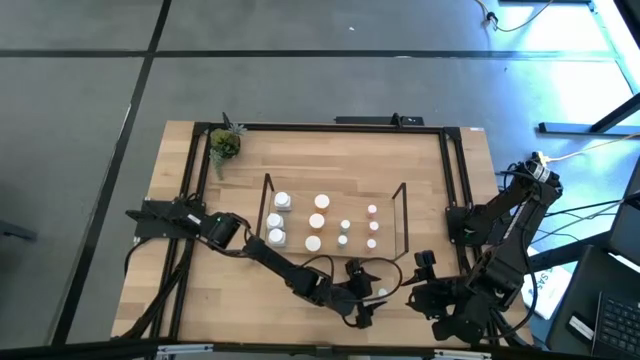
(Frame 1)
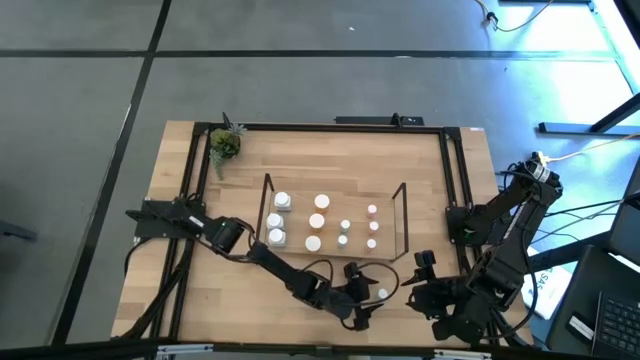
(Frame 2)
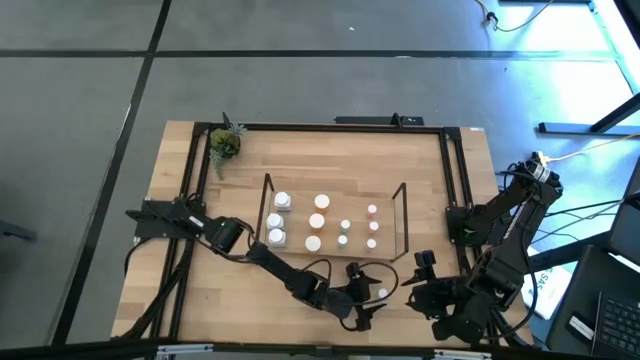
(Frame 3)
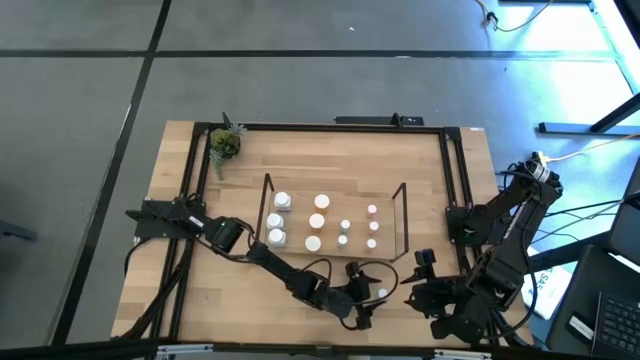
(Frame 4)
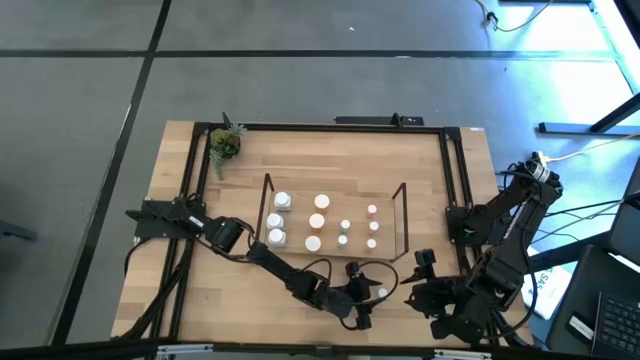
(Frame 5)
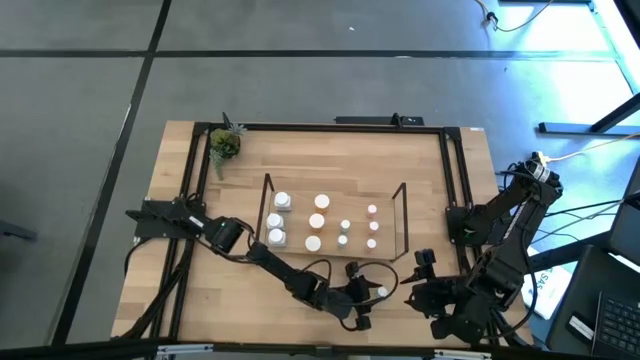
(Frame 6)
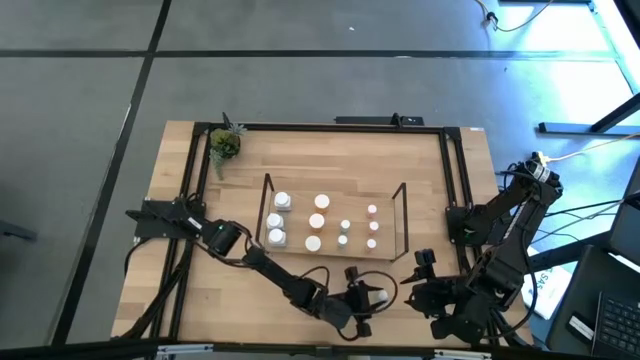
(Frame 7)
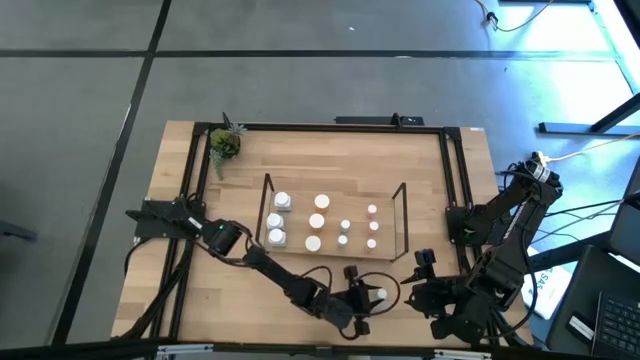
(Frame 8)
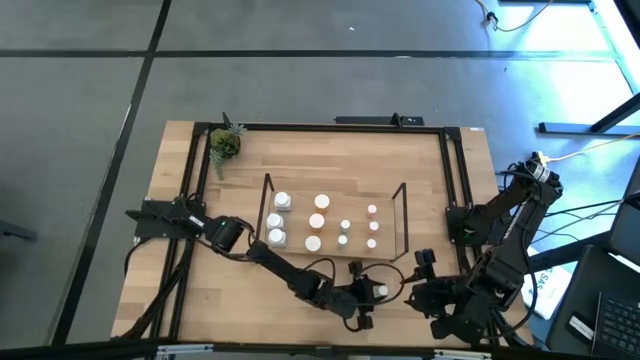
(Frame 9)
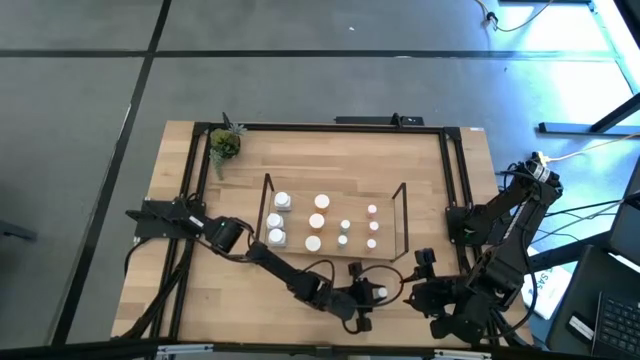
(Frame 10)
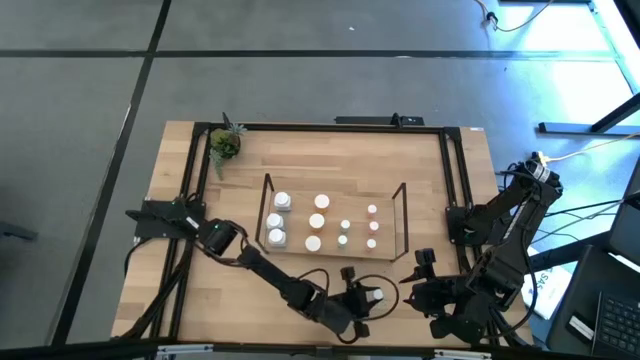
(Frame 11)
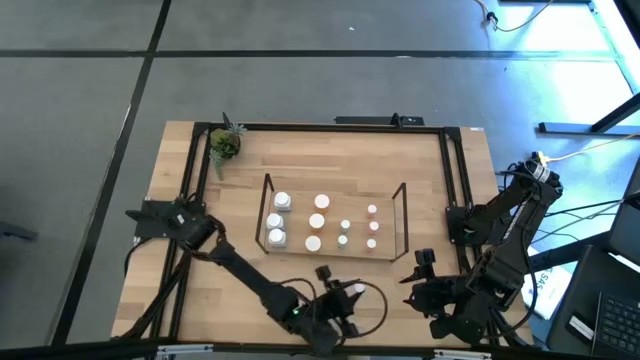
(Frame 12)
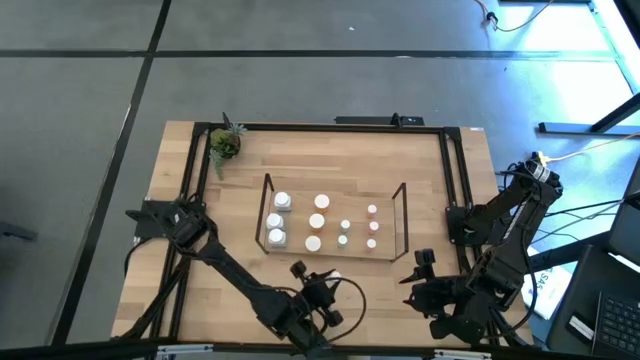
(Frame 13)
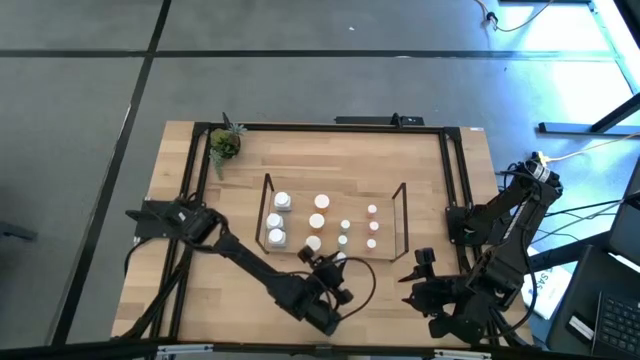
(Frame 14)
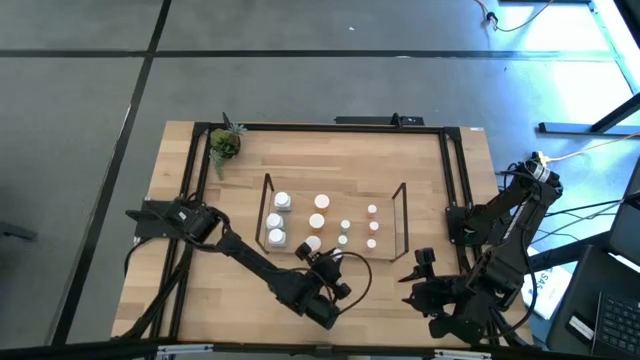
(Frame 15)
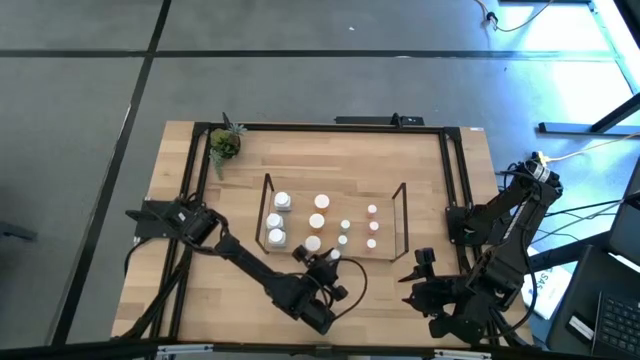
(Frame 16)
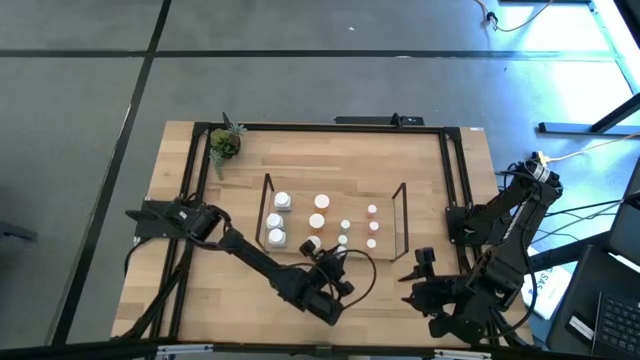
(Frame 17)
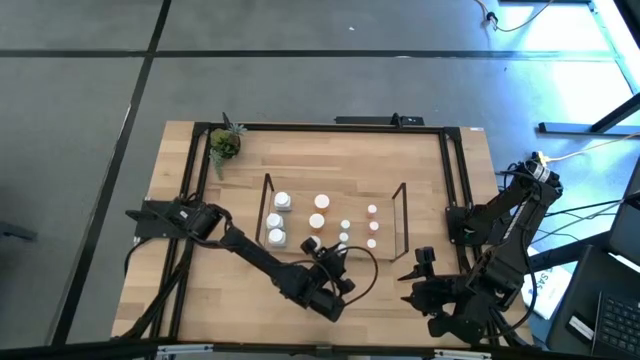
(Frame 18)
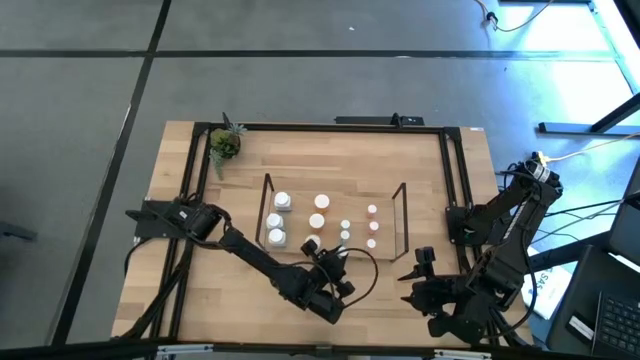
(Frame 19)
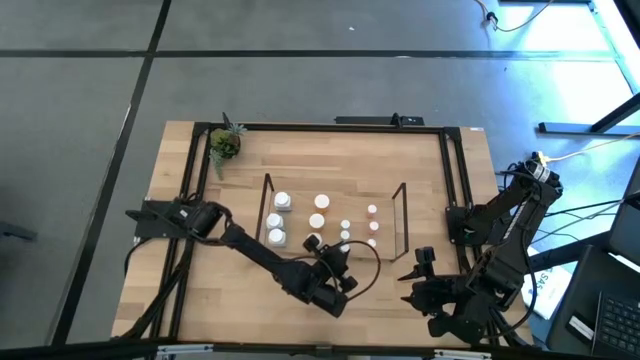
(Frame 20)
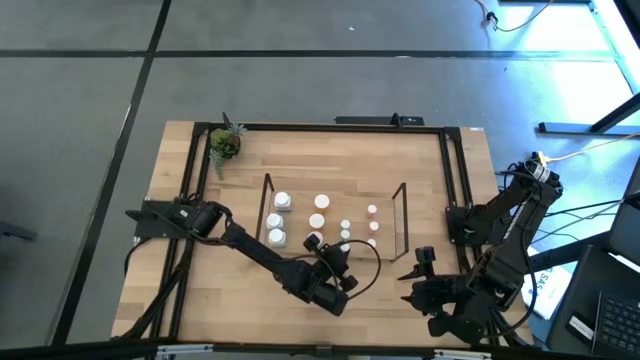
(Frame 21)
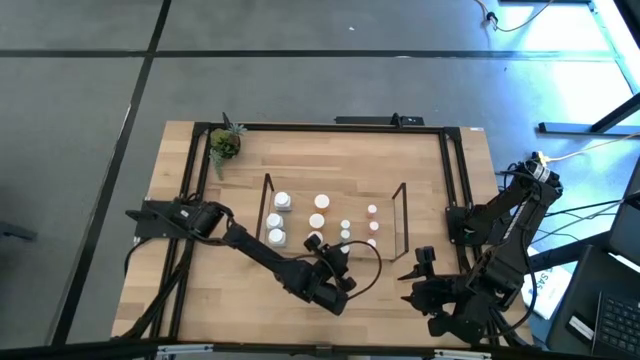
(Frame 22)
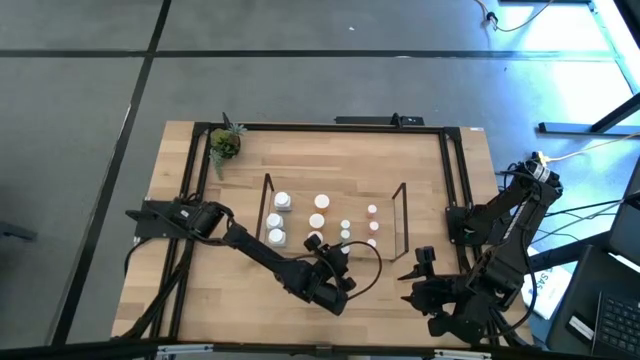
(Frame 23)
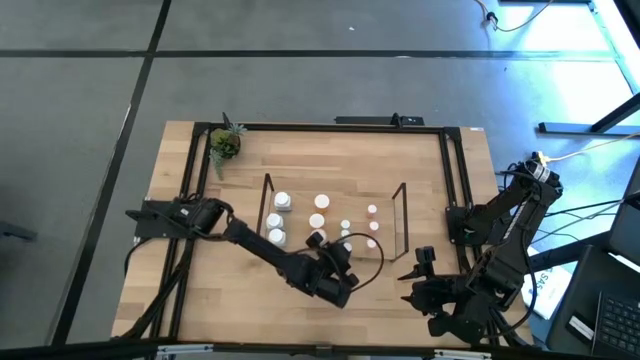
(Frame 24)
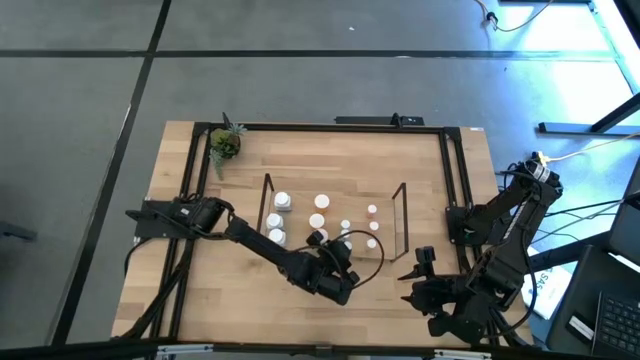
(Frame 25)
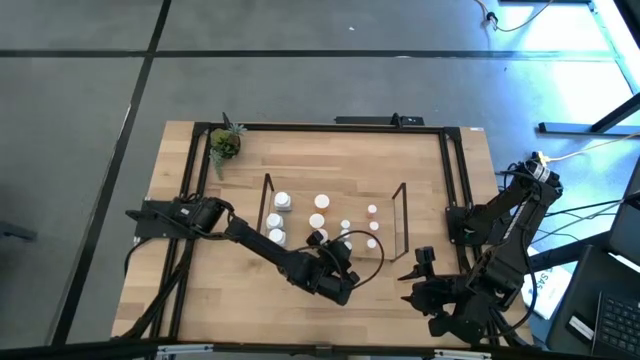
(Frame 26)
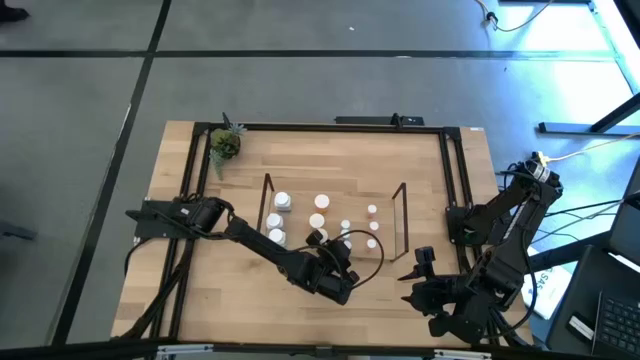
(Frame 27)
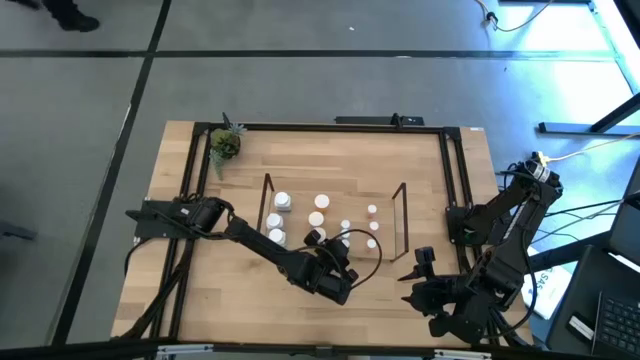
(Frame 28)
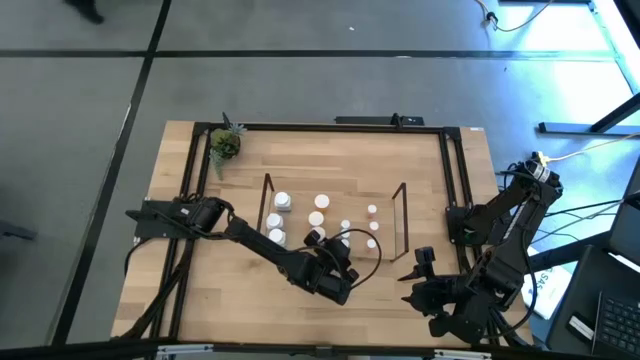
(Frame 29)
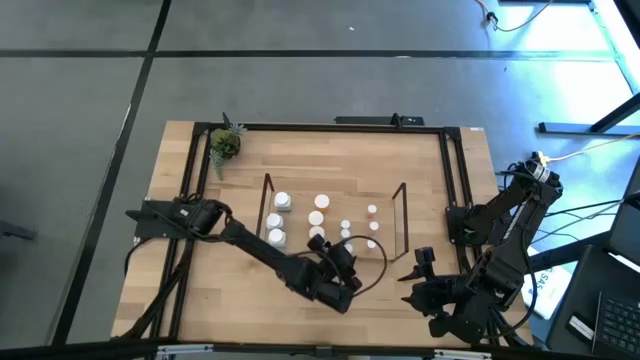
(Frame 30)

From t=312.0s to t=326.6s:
Task: Pick and place medicine bottles onto shelf by color
Put the light blue pill bottle on the shelf aligned with the other light blue pill bottle

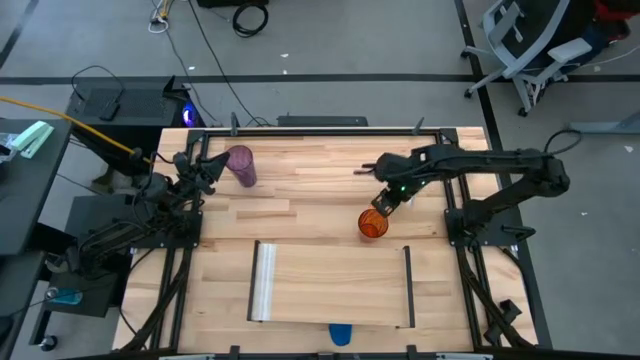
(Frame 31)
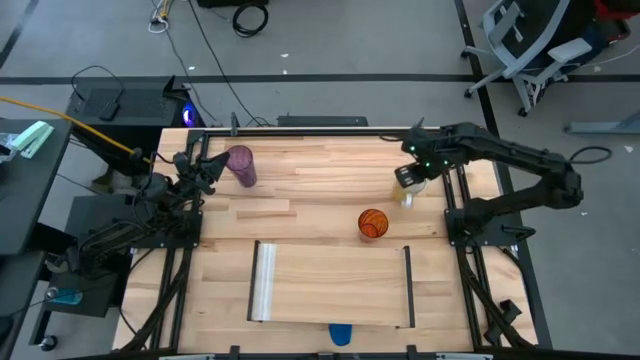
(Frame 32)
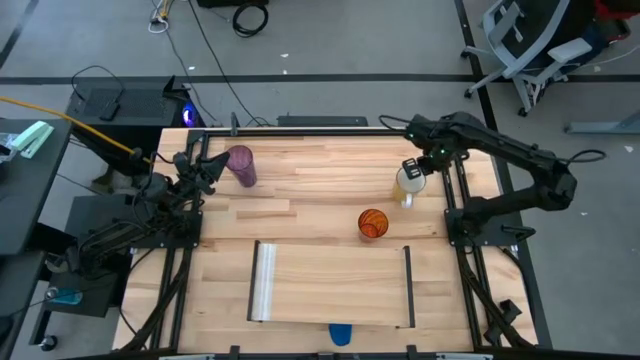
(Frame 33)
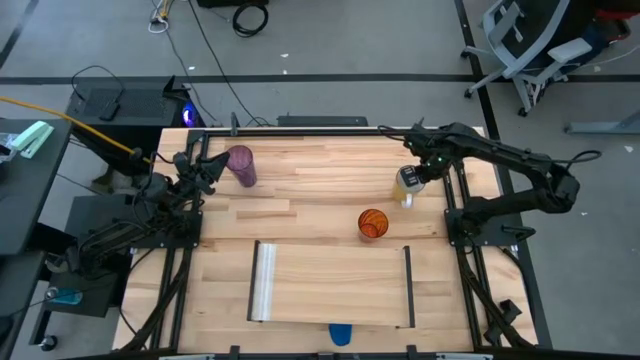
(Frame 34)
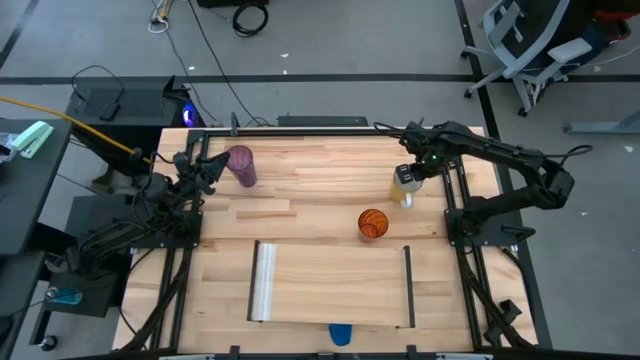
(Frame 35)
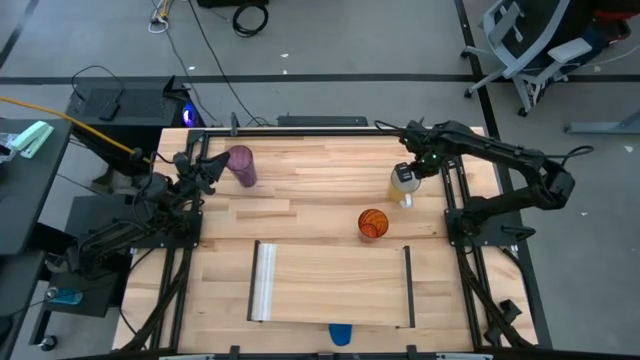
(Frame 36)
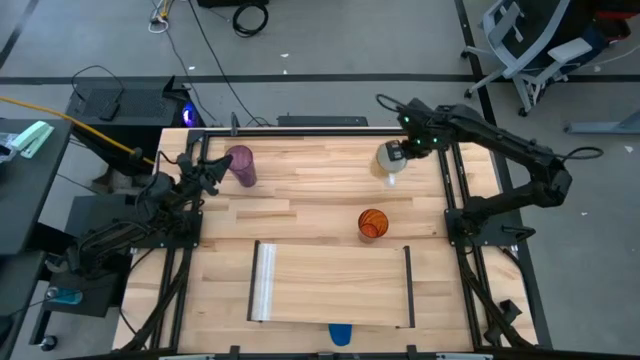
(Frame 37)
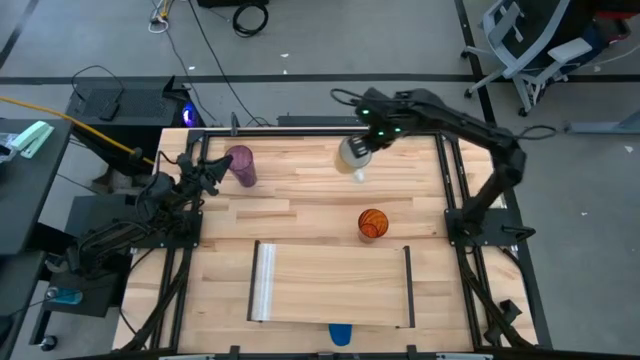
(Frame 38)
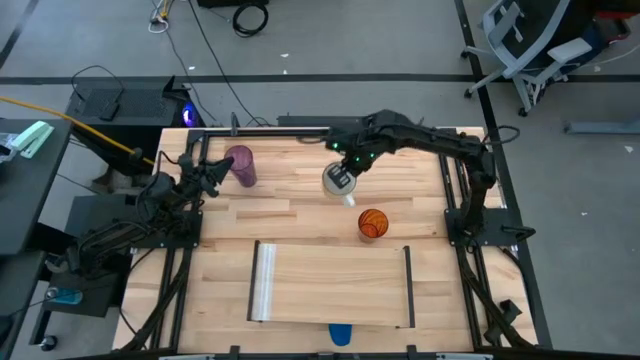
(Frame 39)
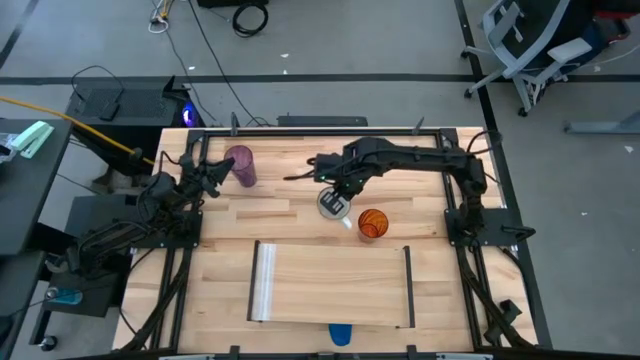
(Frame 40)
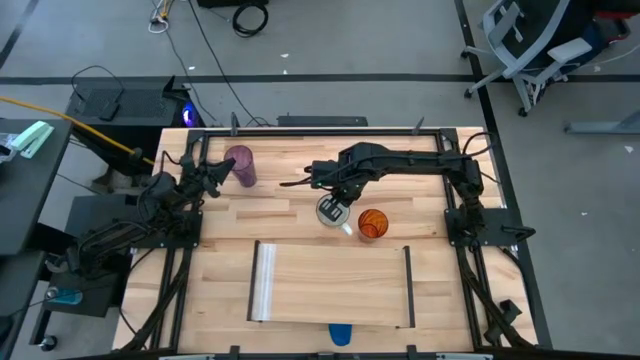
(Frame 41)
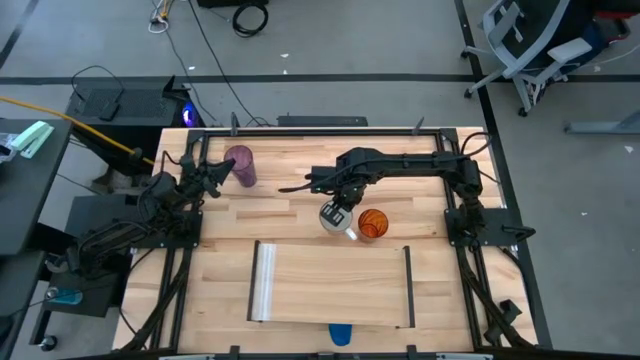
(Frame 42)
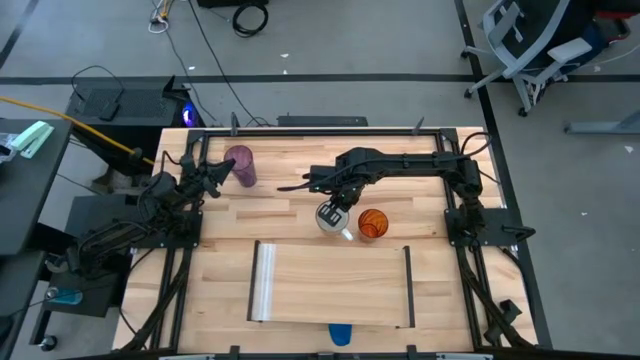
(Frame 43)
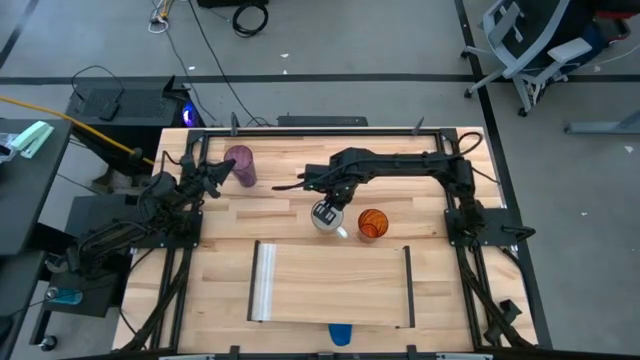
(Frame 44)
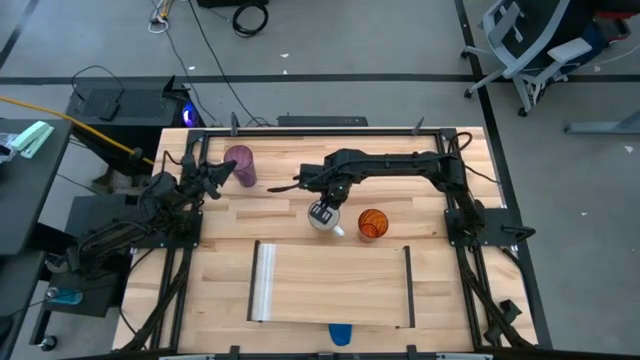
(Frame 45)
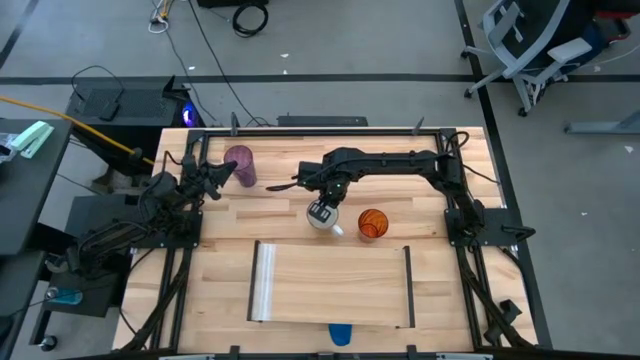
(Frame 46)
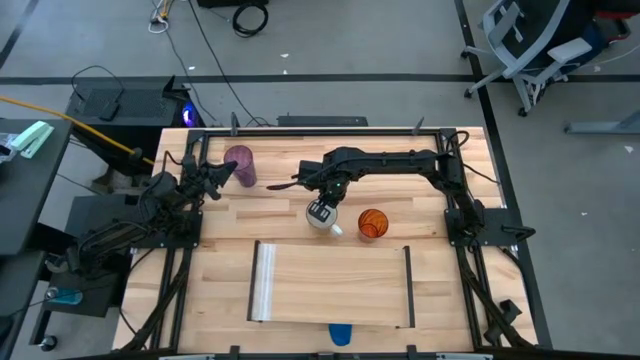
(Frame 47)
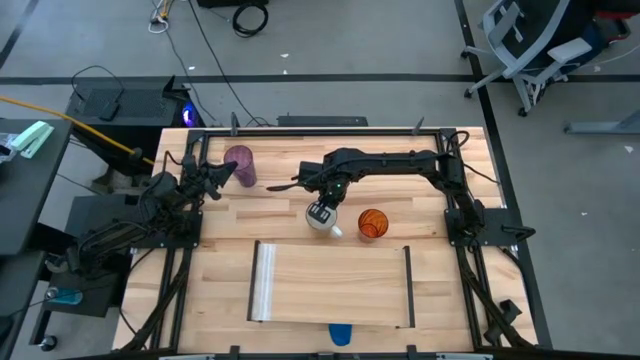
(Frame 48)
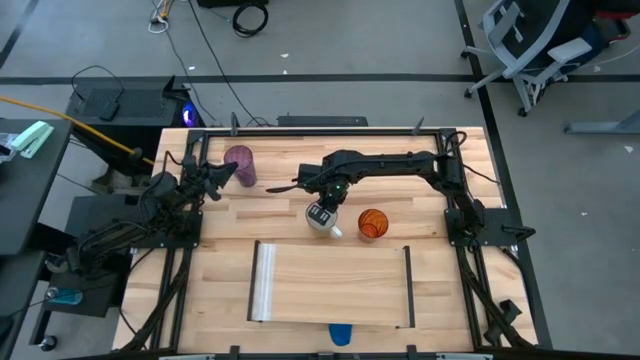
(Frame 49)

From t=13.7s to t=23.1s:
Task: Stack small to large cups/mugs on shelf
Move the yellow mug to the middle of the table
